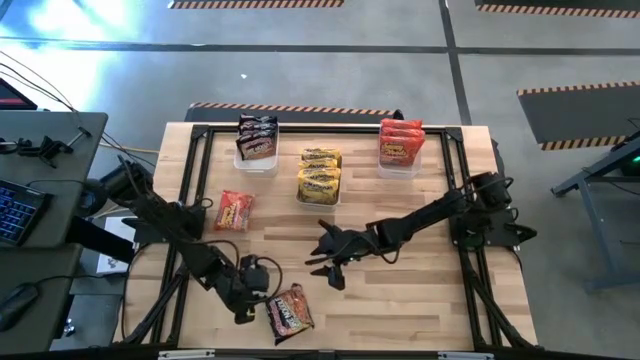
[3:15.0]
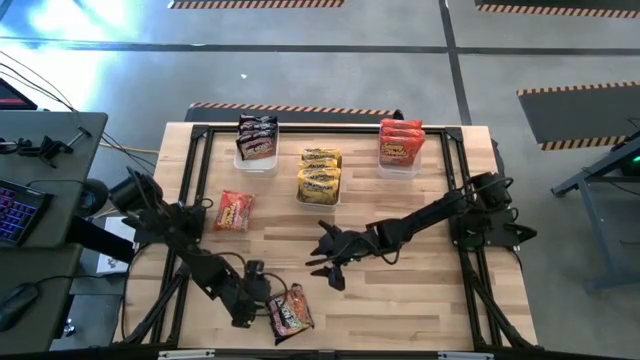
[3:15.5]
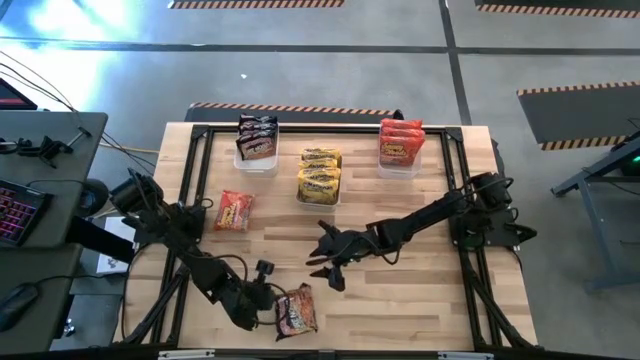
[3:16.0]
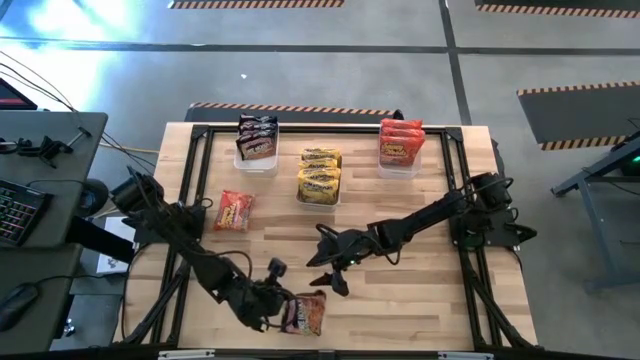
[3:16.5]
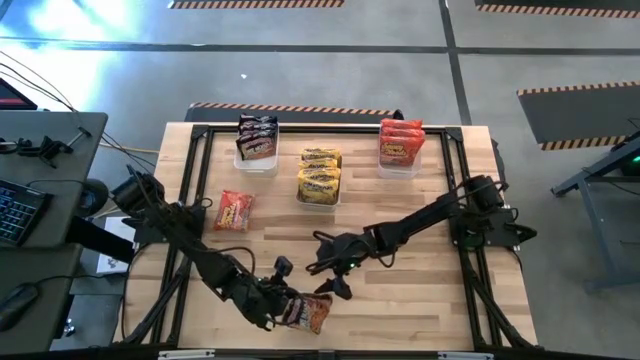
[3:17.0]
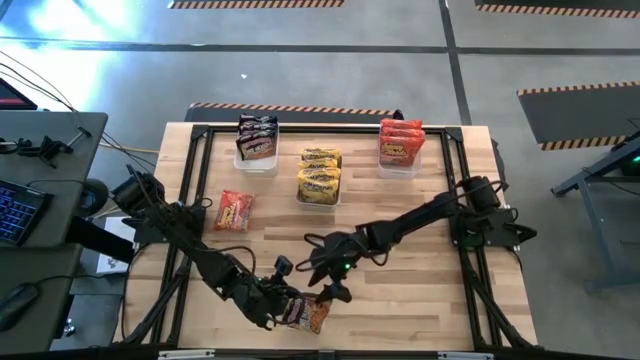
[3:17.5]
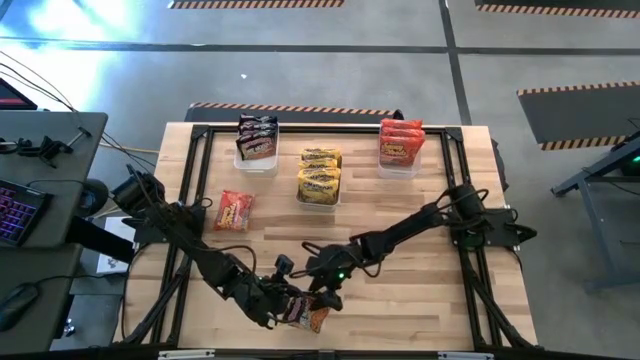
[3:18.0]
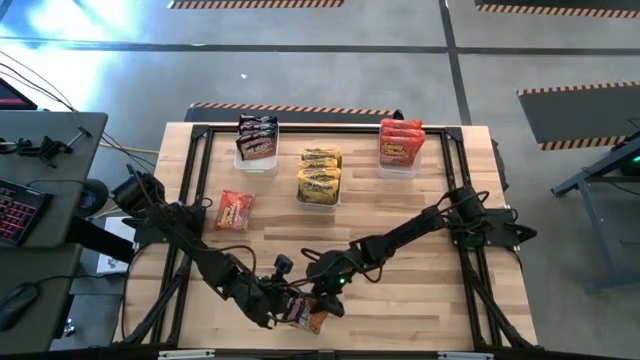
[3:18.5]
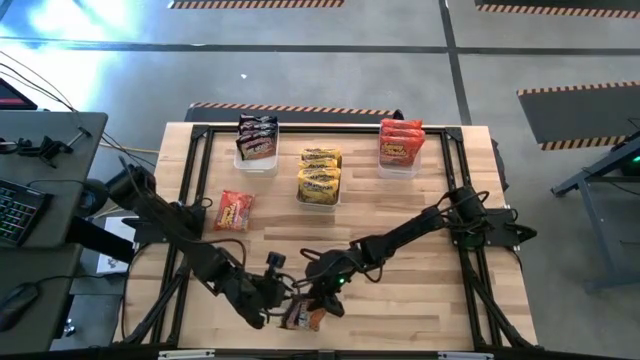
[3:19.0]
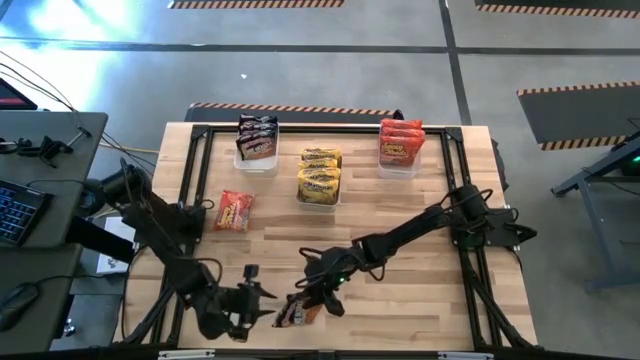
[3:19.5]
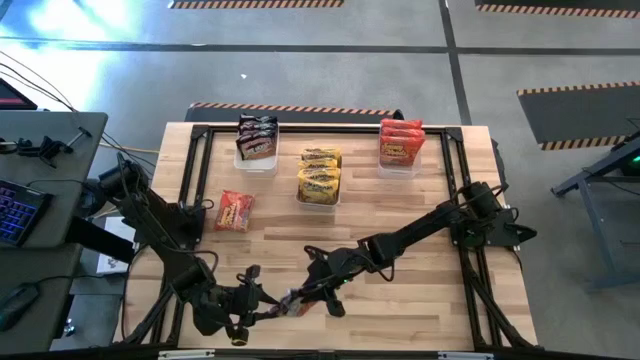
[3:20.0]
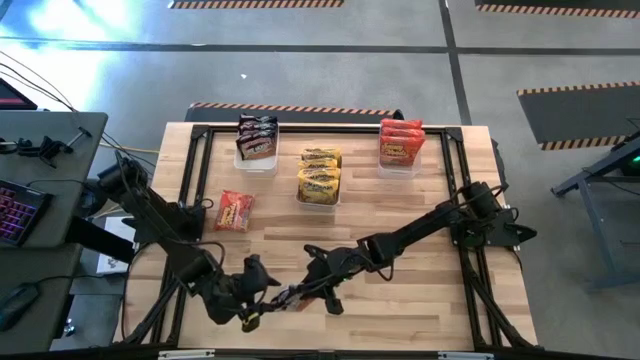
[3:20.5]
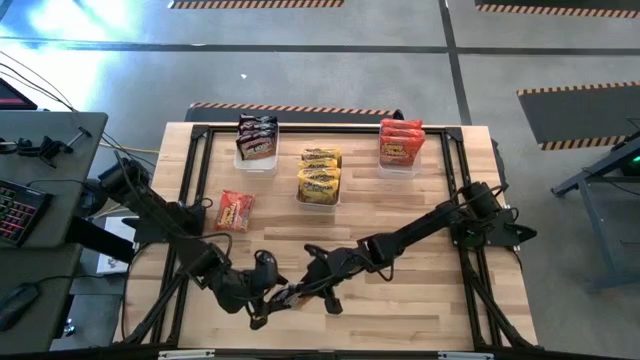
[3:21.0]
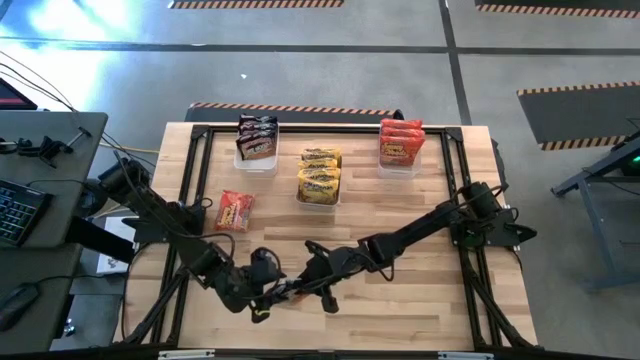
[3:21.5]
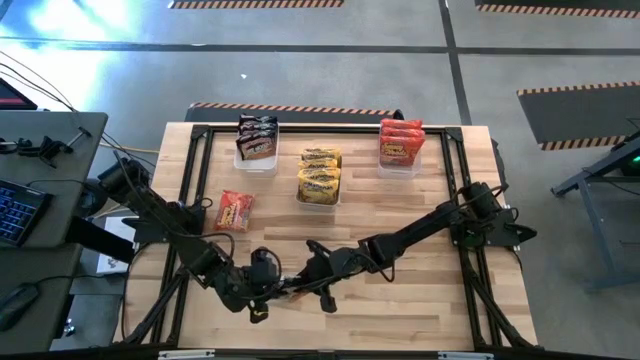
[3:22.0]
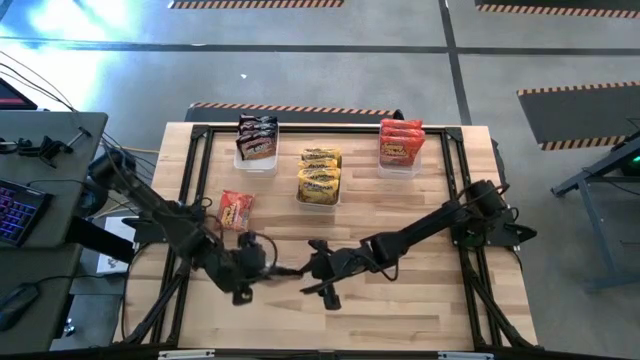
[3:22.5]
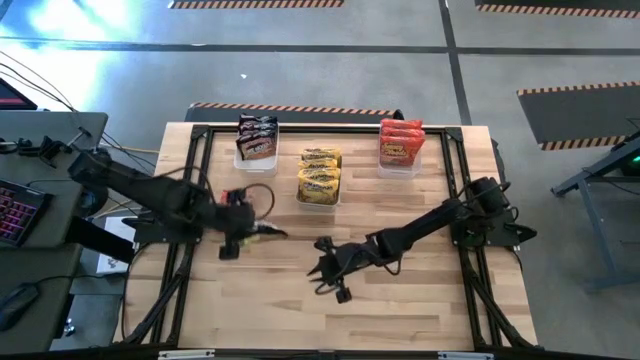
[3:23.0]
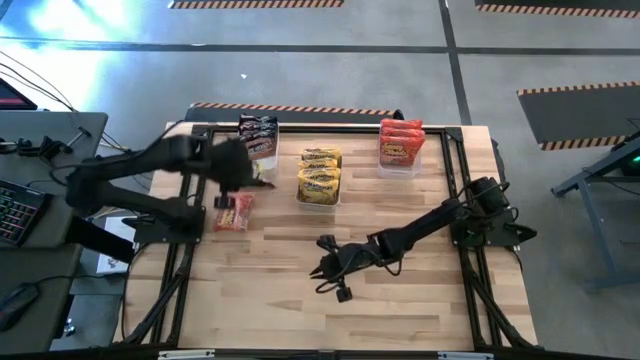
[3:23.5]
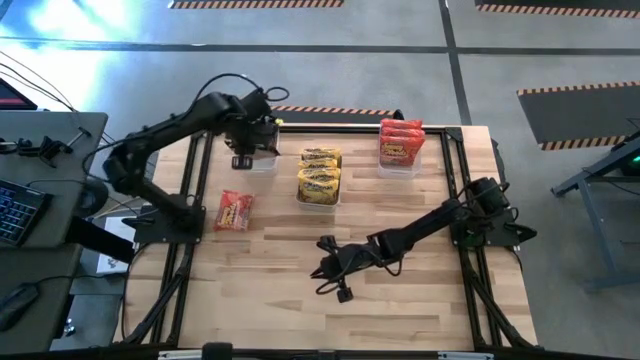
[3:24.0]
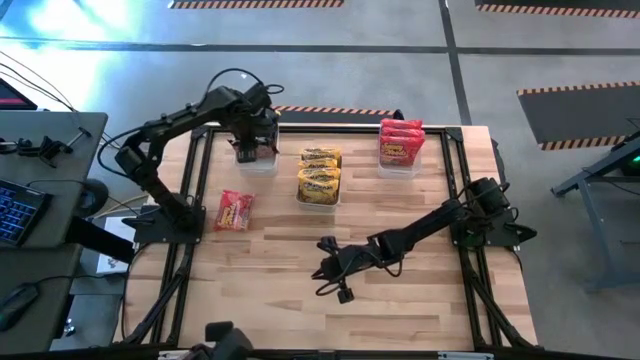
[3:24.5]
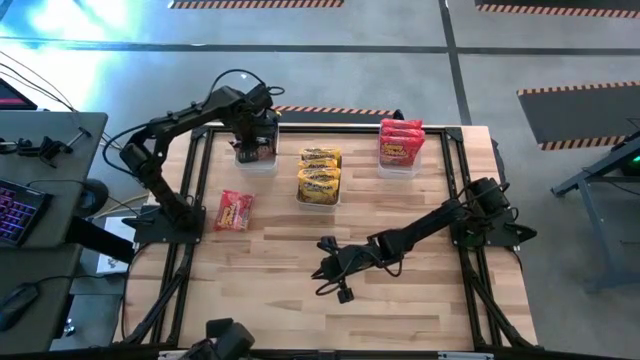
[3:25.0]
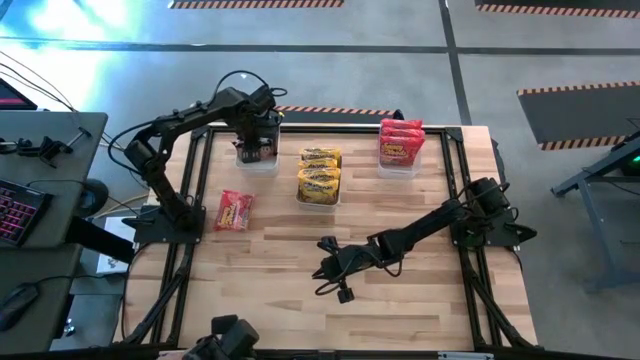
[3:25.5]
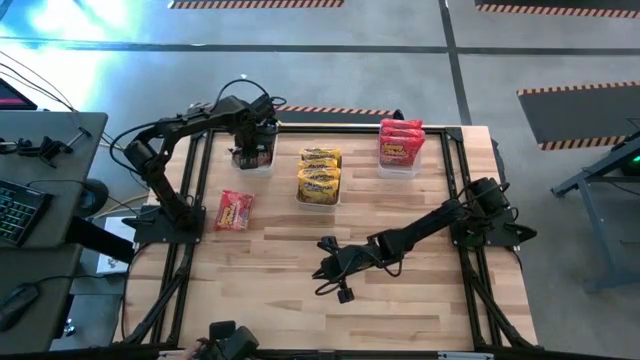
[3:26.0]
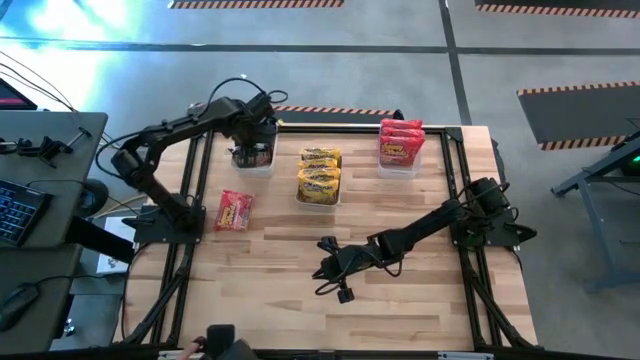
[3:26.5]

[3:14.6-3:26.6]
Task: Sort Maruchan noodles
Put the black noodle pack into the white bin

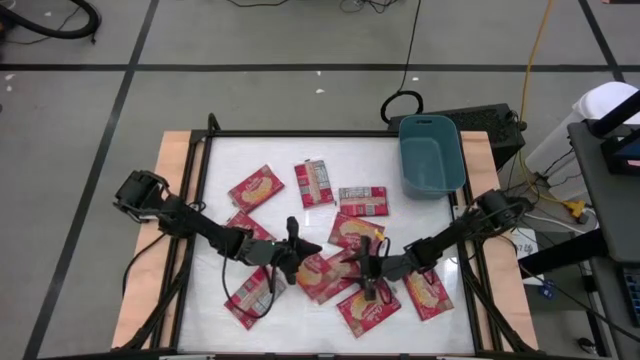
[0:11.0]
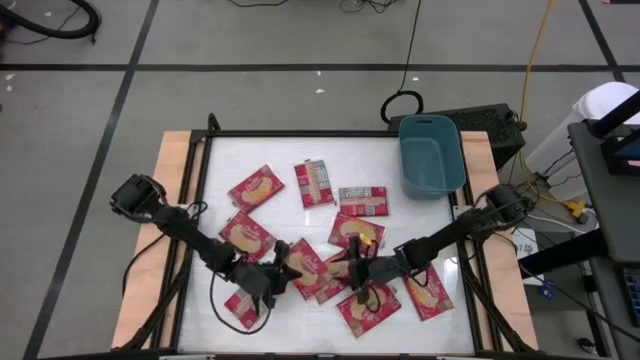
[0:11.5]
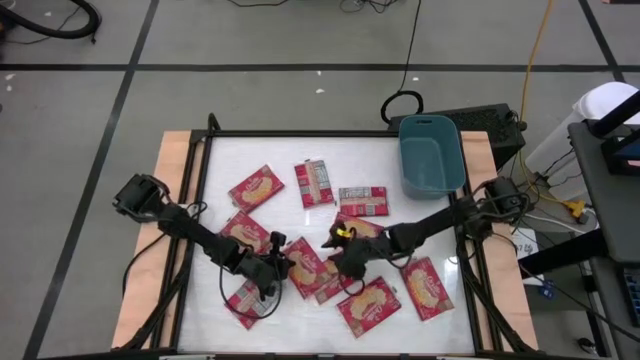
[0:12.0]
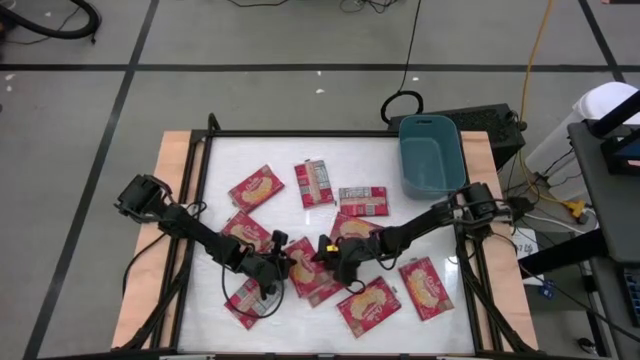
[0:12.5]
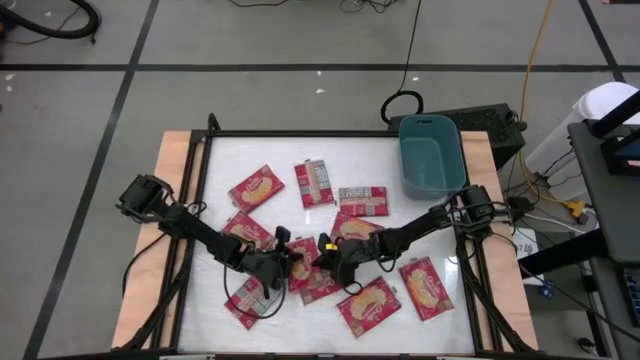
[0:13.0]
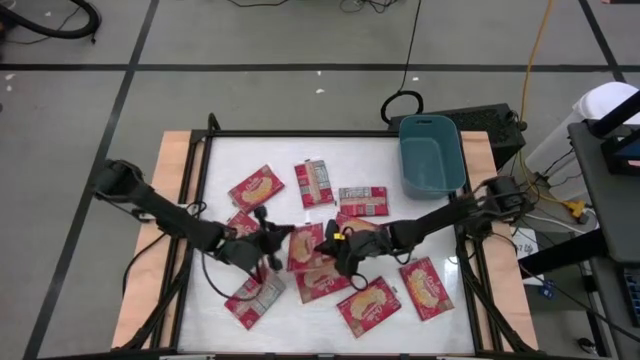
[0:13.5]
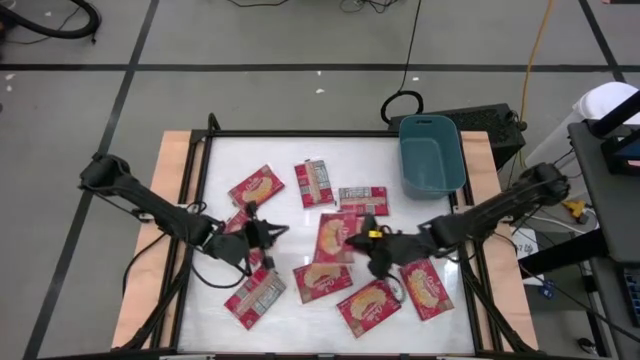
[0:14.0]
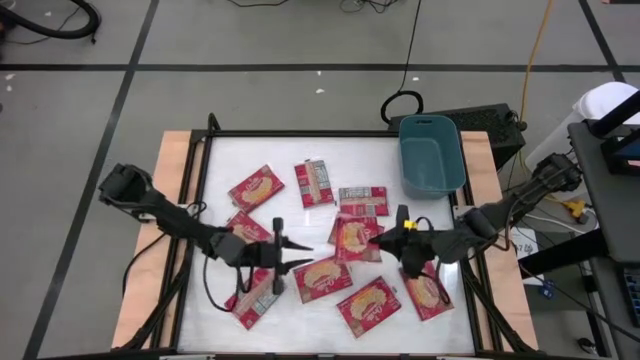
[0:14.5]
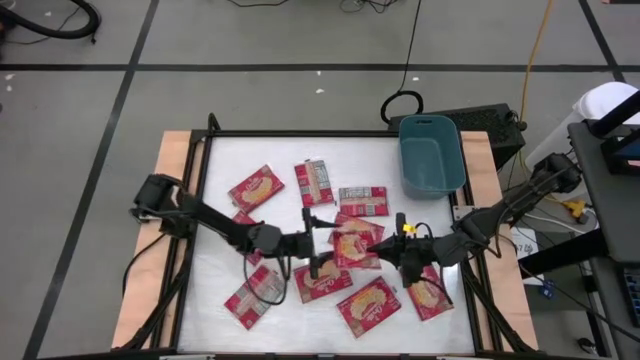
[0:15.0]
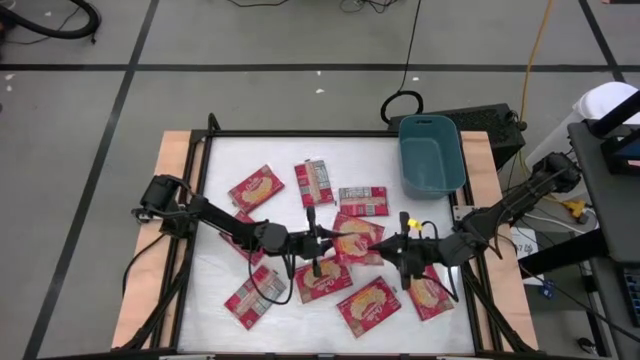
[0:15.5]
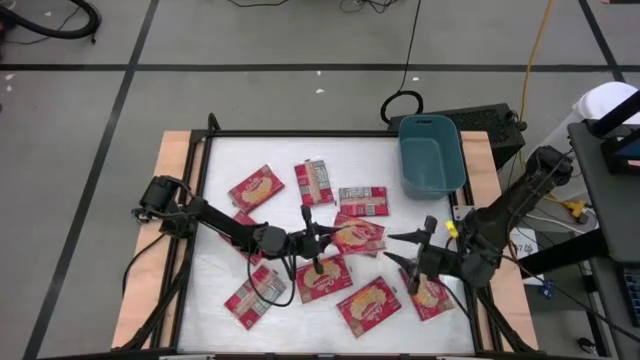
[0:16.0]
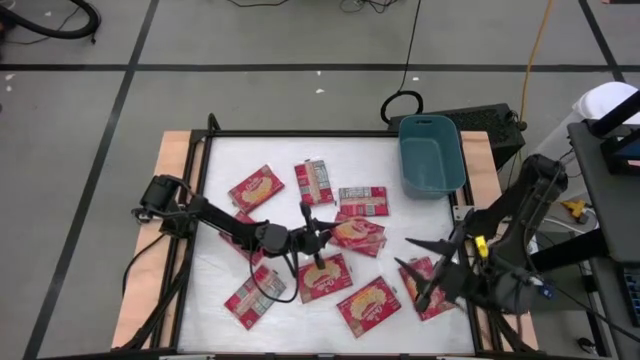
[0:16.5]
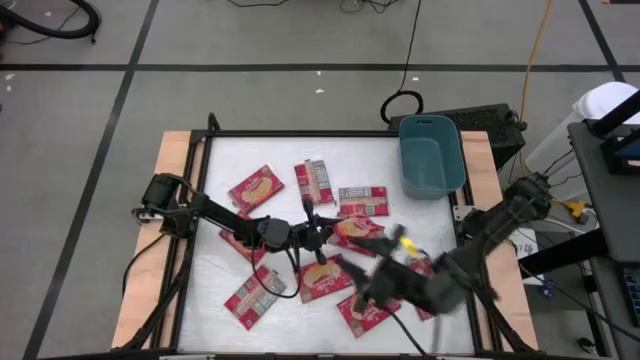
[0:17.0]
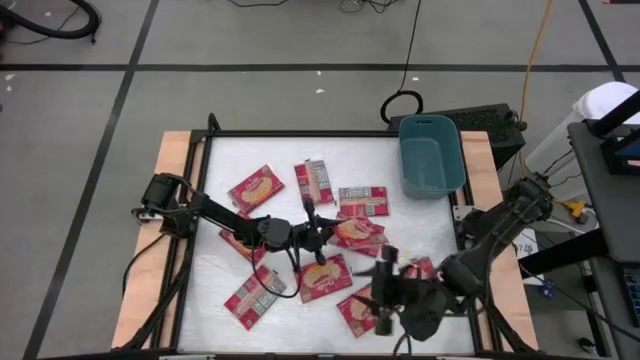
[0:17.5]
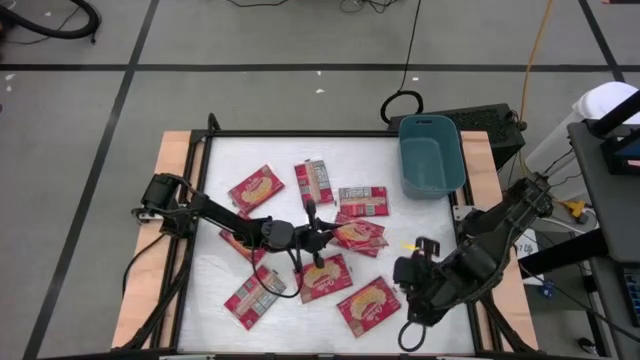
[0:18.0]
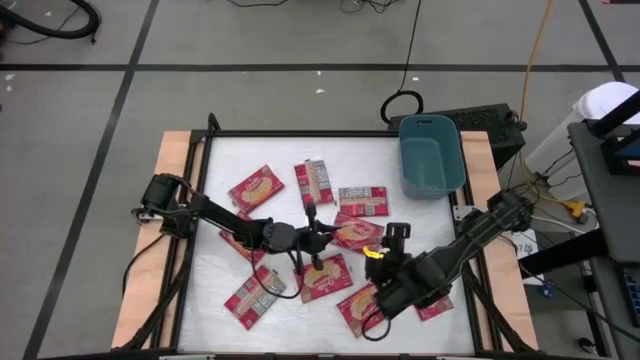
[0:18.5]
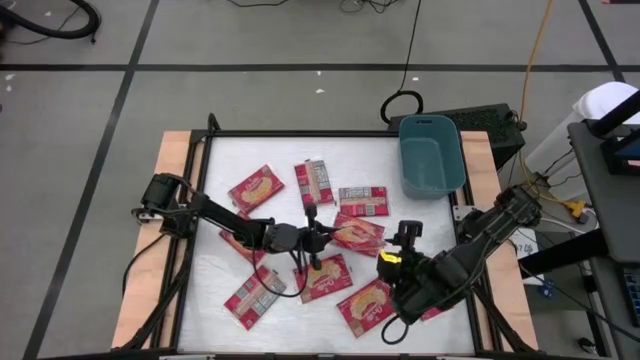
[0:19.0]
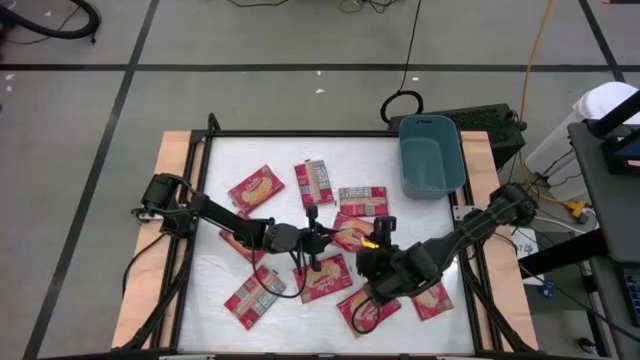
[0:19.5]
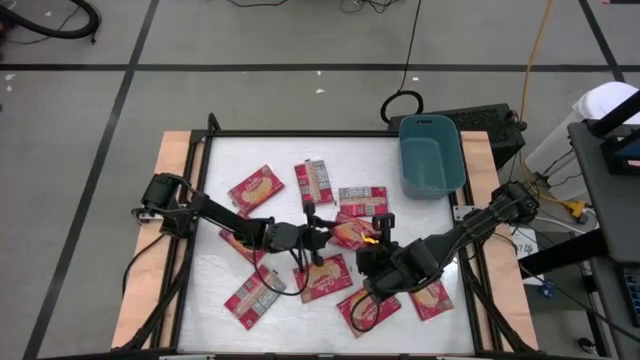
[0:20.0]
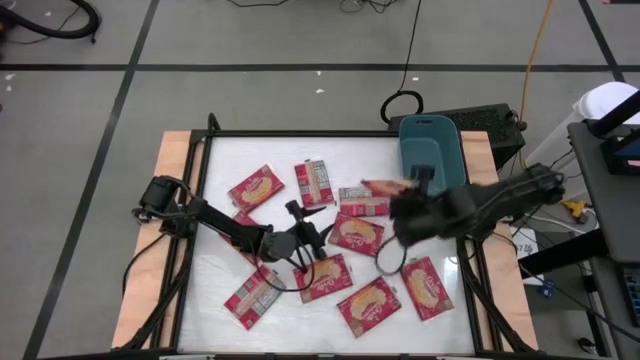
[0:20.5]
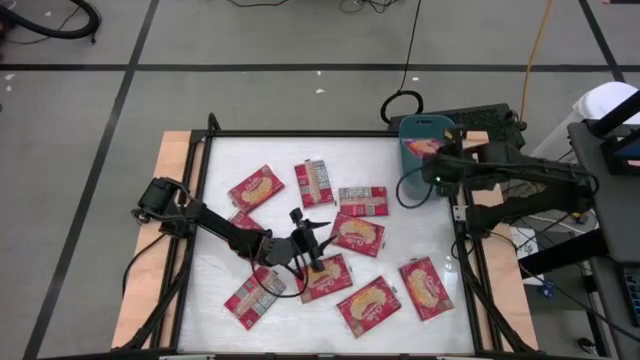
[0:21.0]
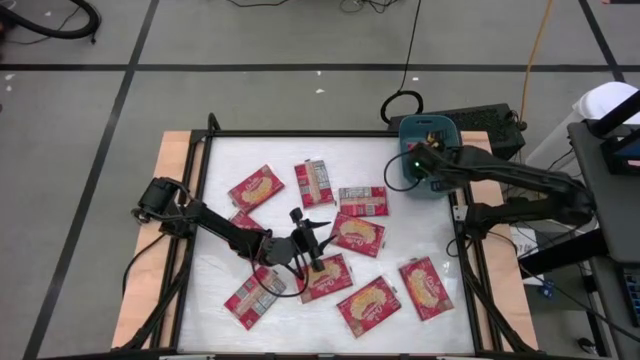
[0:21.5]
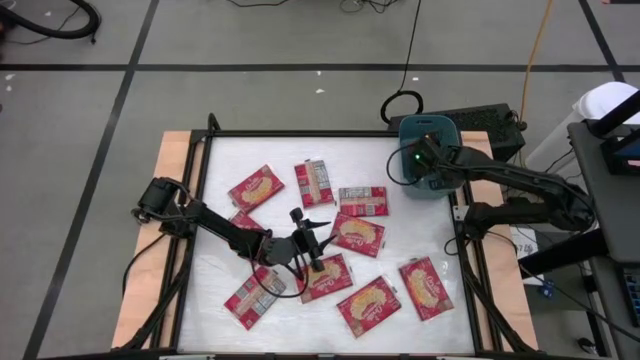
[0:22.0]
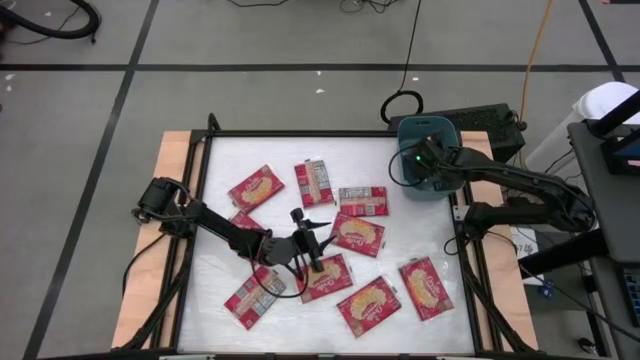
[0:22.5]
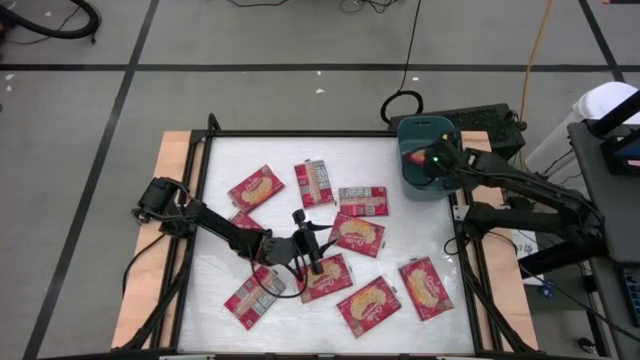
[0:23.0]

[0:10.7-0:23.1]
Task: Sort popcorn bags into baskets
Put the red popcorn bag into the blue bin
